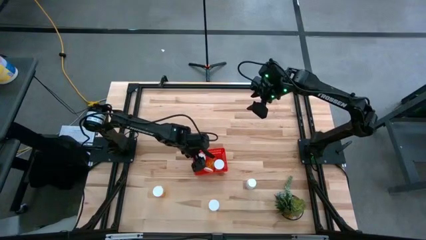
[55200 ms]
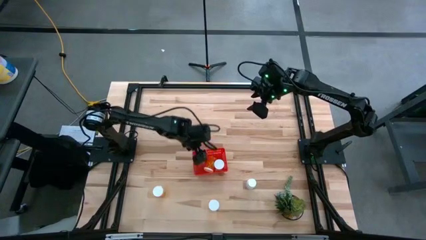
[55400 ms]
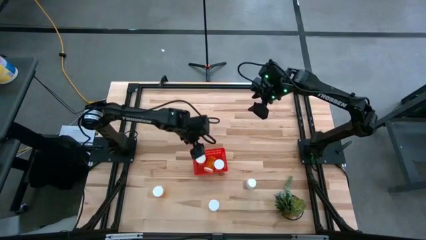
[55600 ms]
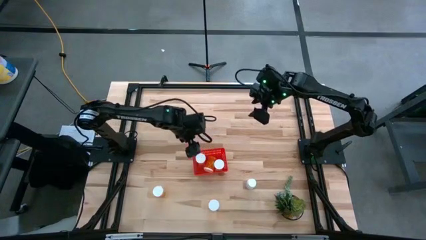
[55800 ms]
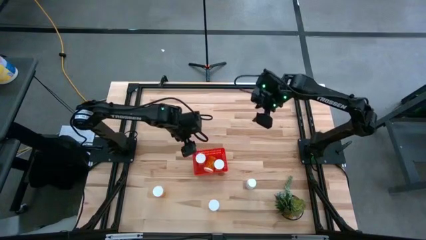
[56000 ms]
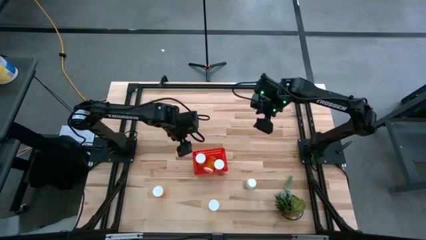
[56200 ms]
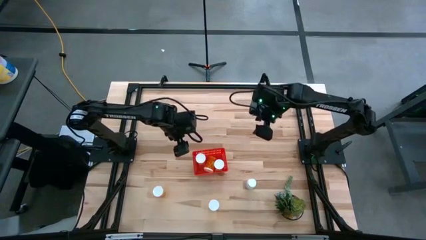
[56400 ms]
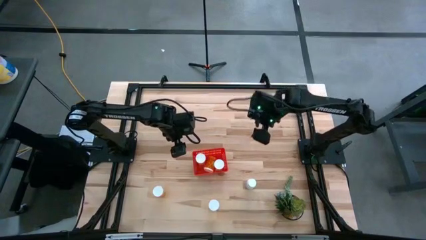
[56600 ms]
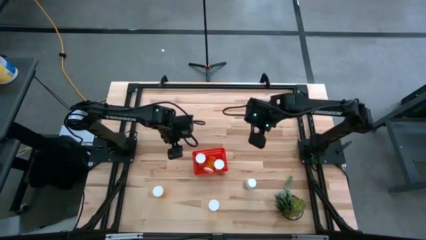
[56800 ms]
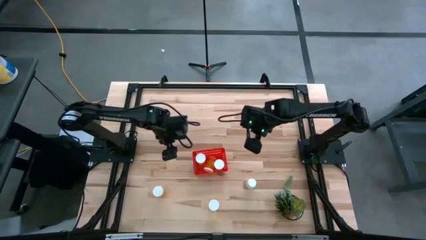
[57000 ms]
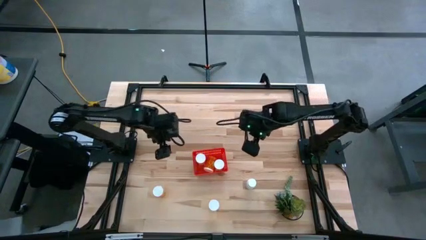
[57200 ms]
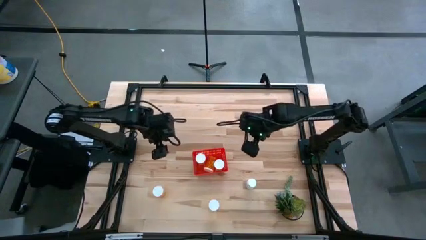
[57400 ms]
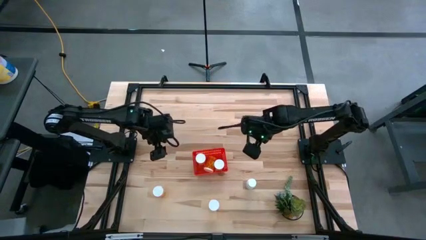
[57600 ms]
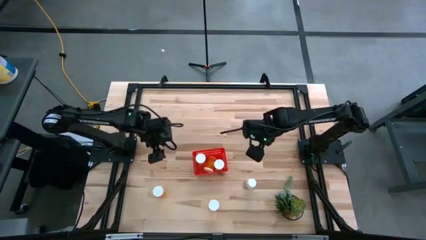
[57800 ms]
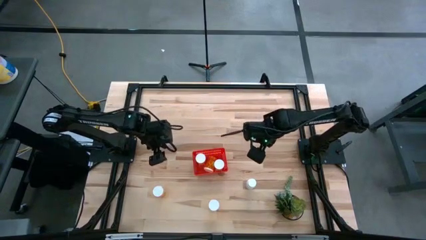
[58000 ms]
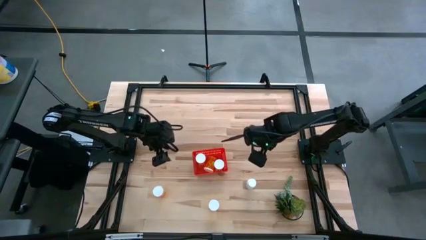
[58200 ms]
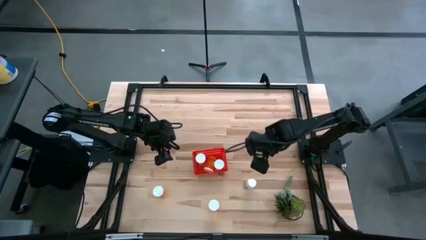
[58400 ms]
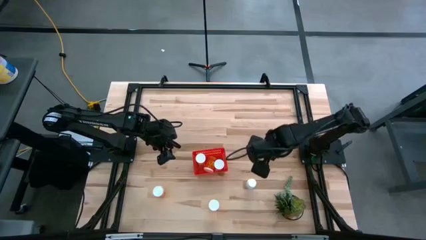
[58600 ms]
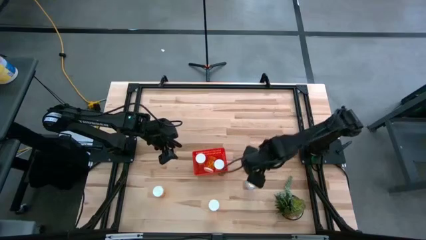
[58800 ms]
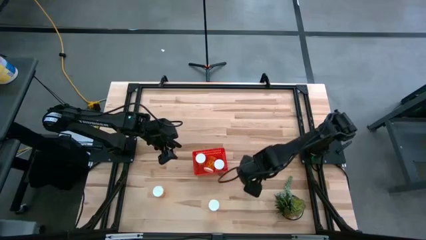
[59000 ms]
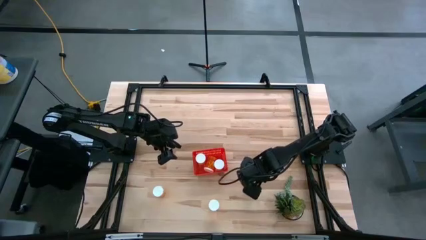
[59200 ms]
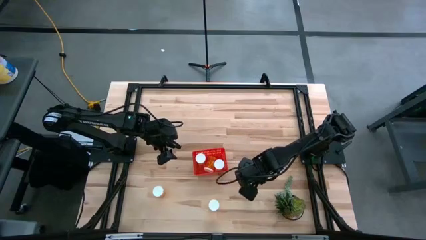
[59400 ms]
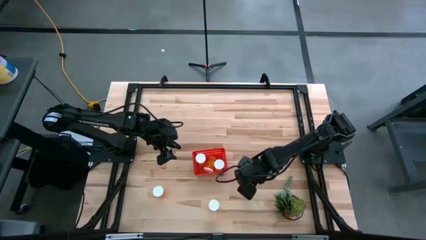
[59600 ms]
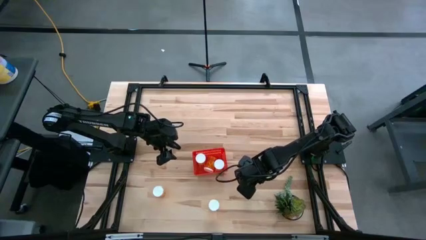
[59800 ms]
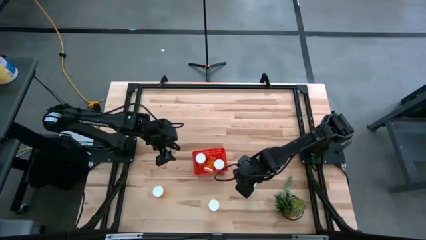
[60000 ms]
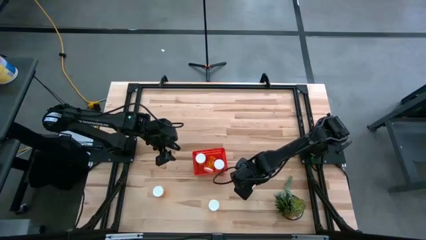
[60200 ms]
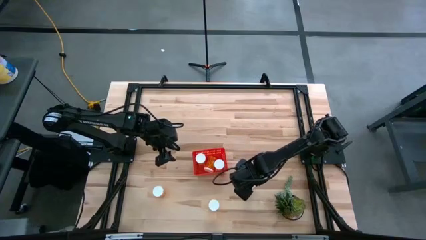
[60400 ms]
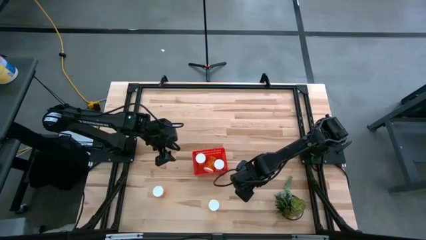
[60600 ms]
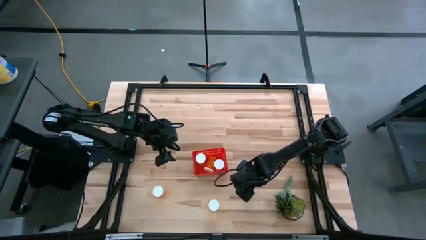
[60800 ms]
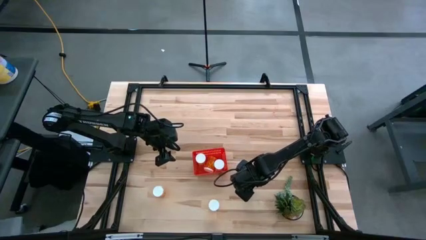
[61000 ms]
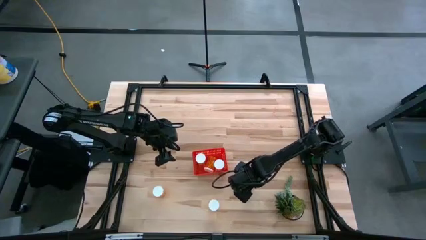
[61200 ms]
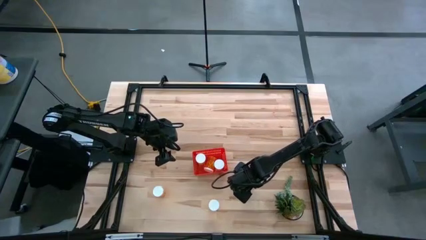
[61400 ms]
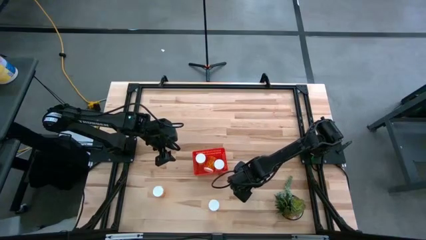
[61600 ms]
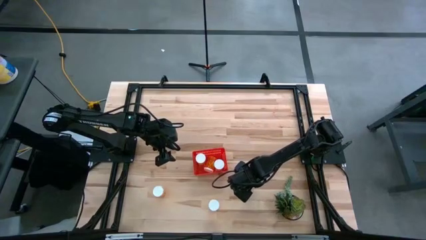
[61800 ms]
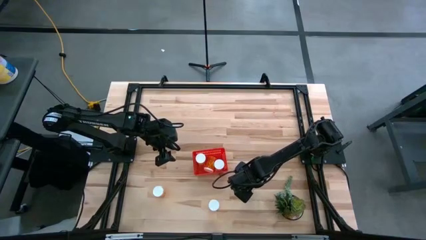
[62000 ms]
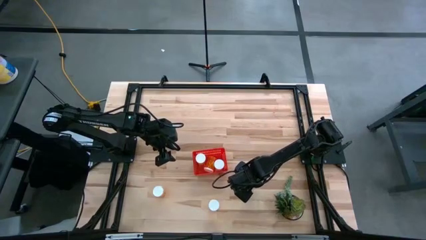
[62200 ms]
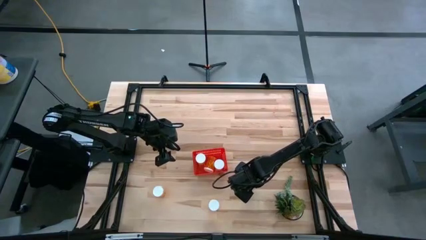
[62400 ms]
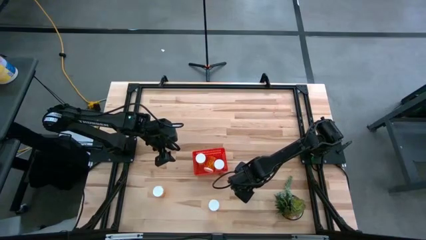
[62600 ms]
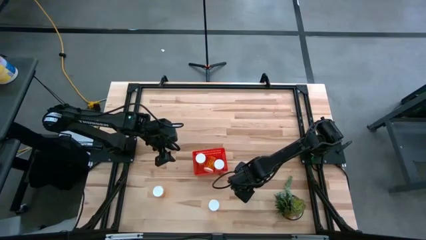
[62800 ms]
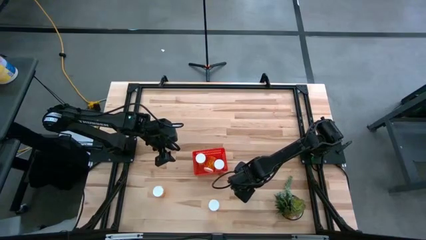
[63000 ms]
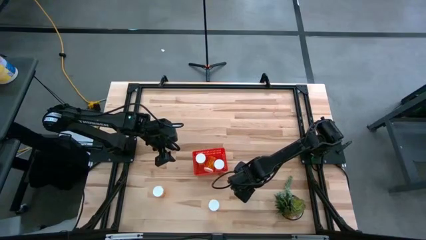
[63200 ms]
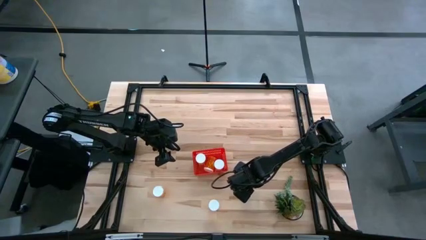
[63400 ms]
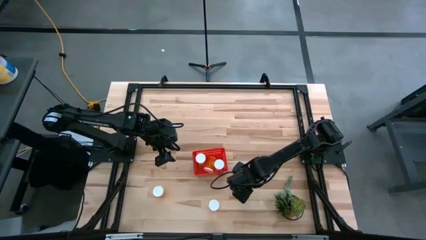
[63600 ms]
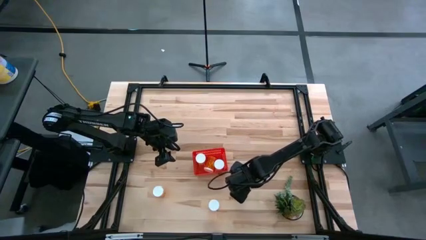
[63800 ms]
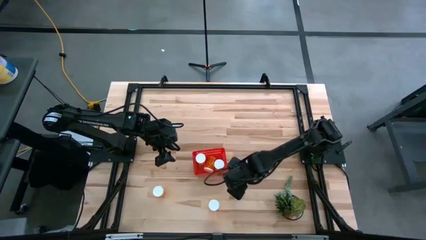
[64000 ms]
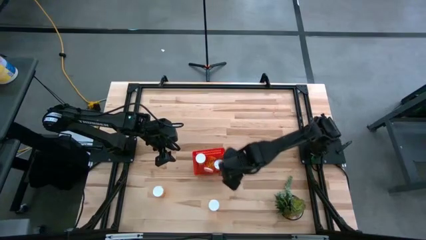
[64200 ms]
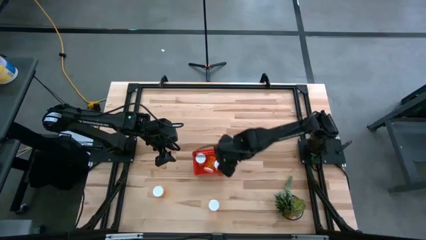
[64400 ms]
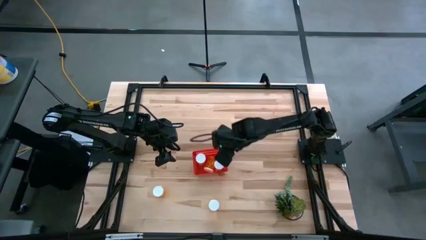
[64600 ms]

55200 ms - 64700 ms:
Task: Pick and place pill bottles into a basket
Put the white pill bottle into the red basket

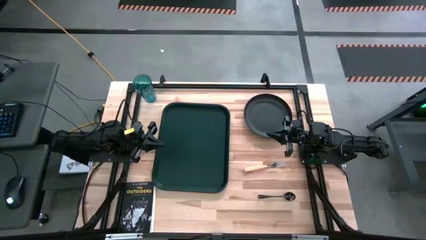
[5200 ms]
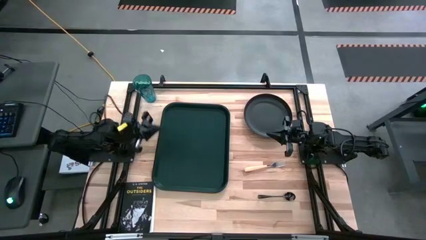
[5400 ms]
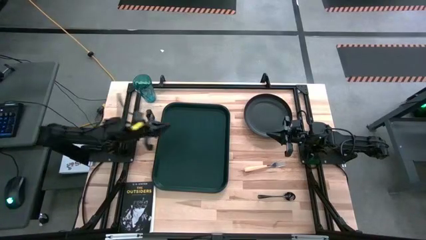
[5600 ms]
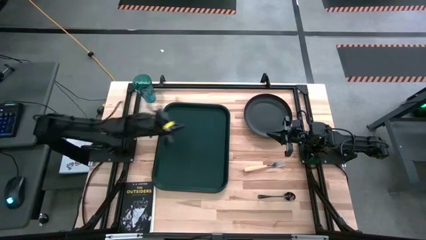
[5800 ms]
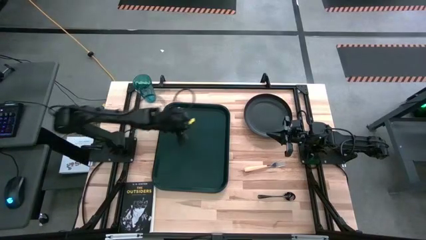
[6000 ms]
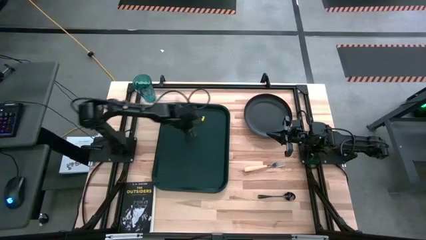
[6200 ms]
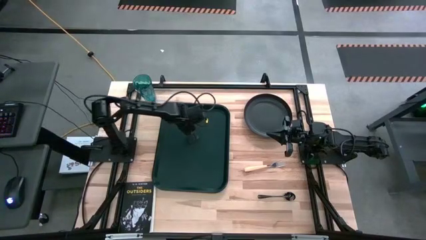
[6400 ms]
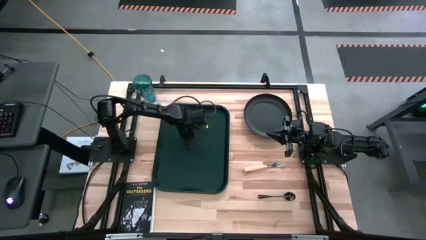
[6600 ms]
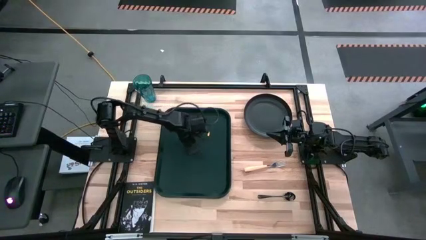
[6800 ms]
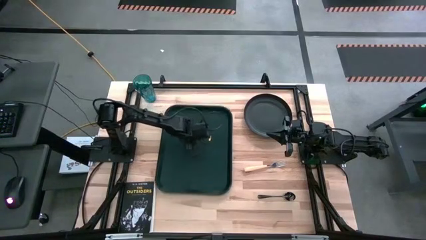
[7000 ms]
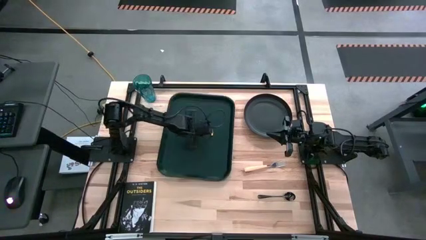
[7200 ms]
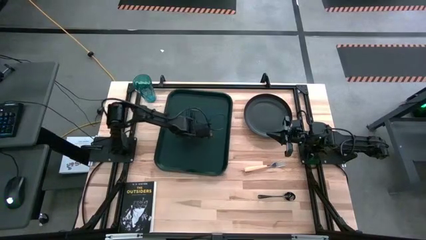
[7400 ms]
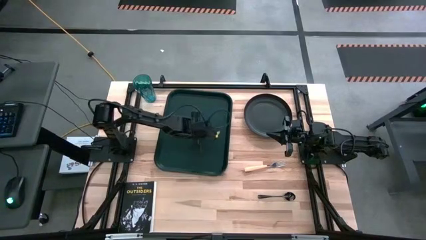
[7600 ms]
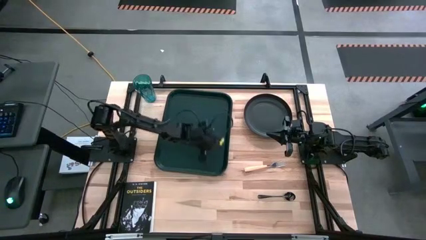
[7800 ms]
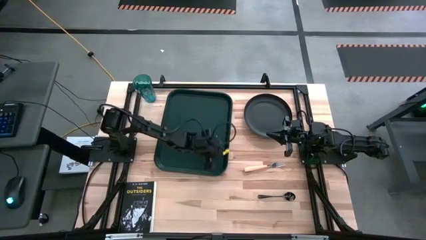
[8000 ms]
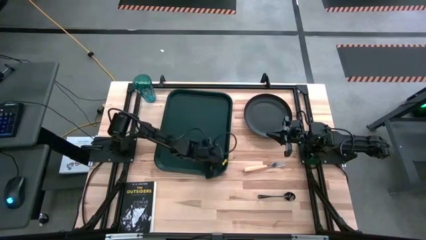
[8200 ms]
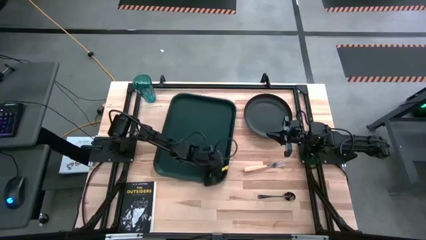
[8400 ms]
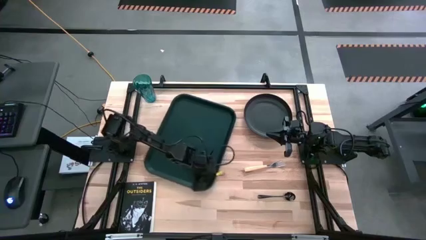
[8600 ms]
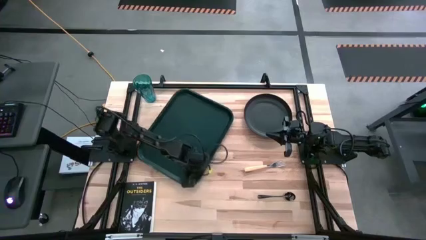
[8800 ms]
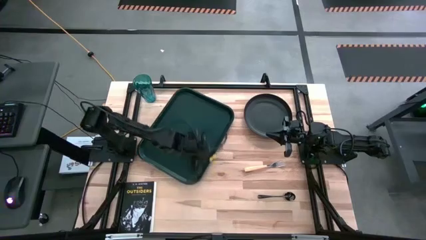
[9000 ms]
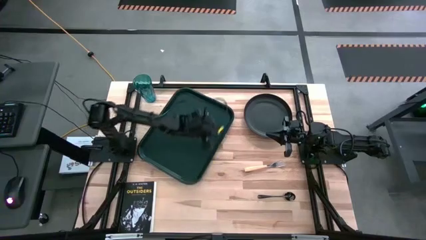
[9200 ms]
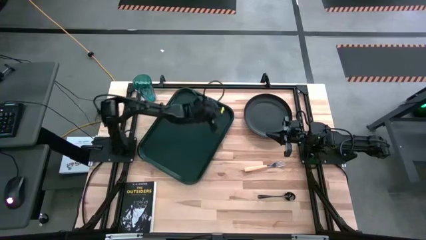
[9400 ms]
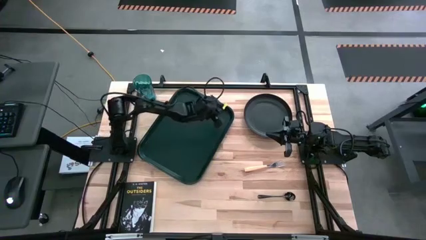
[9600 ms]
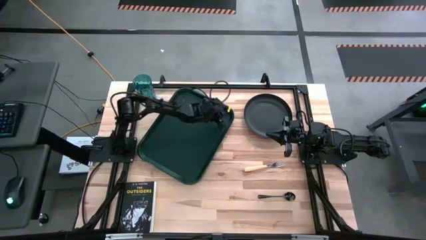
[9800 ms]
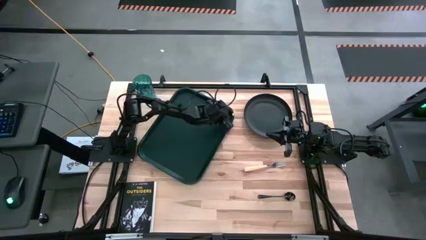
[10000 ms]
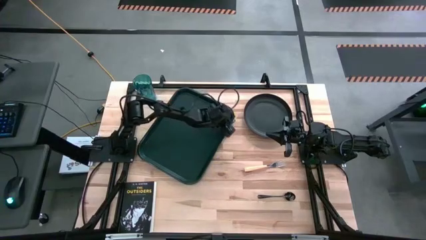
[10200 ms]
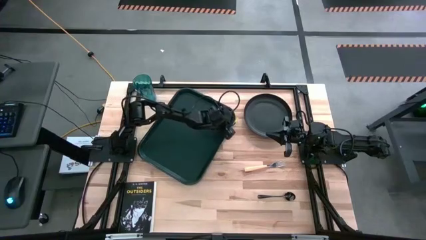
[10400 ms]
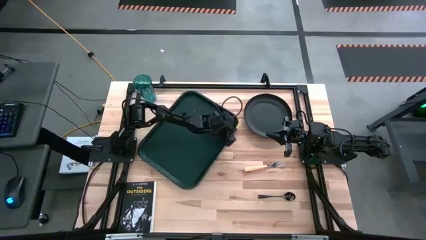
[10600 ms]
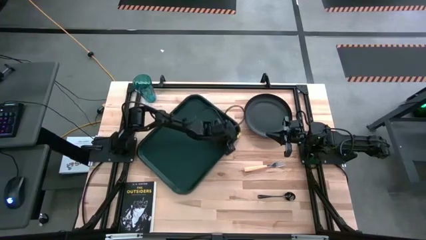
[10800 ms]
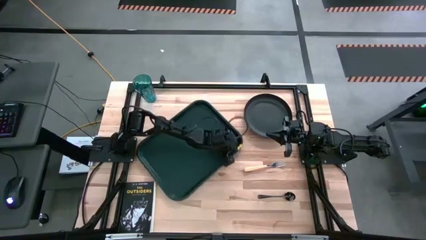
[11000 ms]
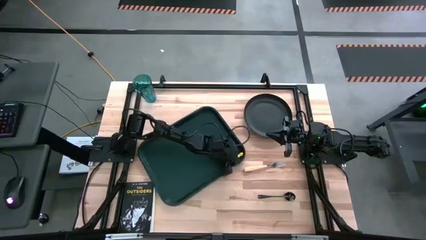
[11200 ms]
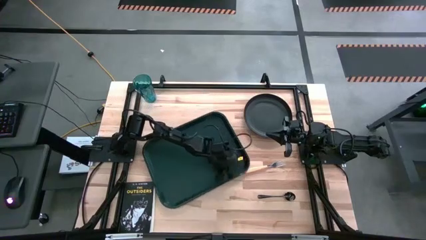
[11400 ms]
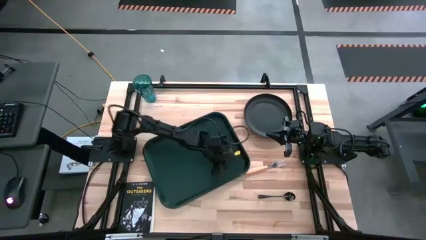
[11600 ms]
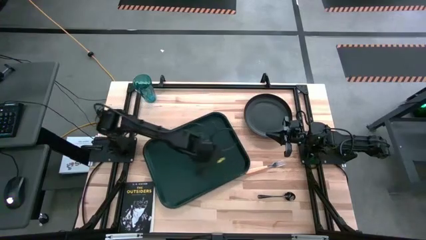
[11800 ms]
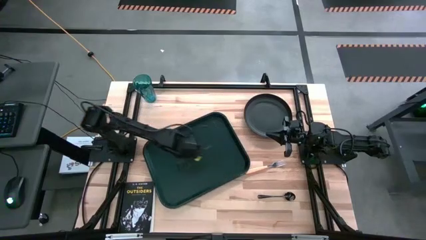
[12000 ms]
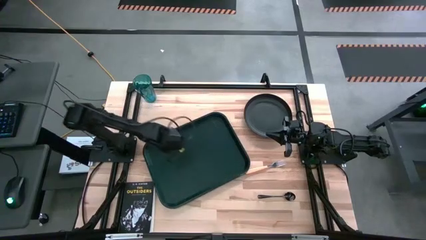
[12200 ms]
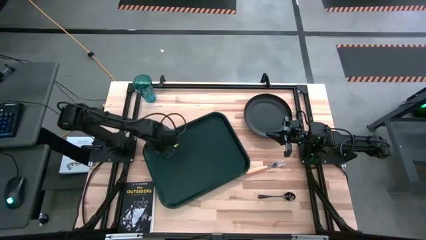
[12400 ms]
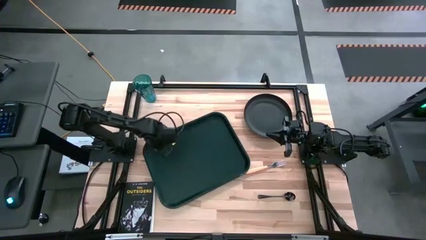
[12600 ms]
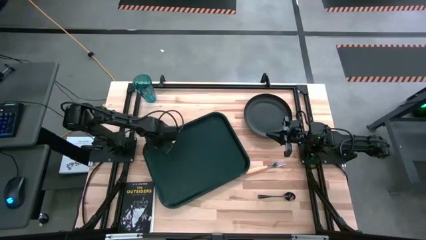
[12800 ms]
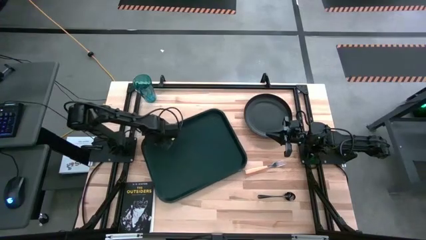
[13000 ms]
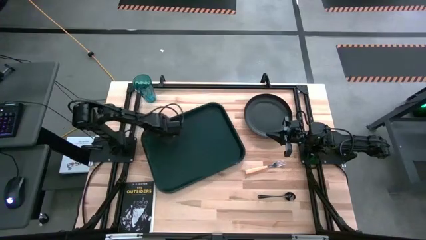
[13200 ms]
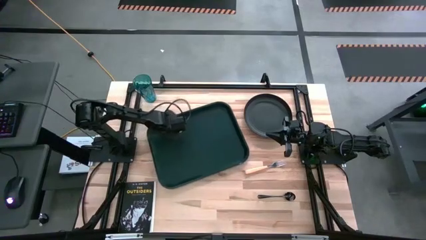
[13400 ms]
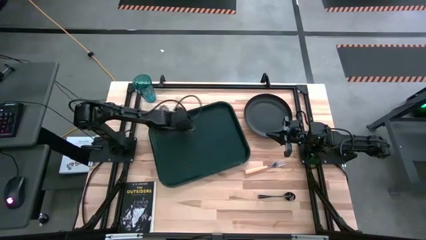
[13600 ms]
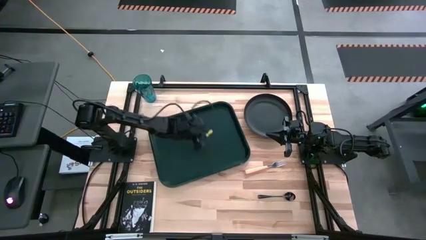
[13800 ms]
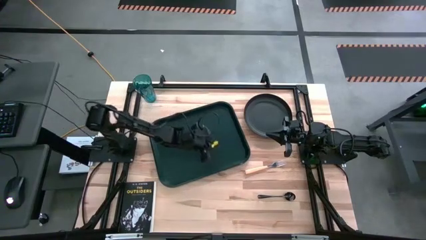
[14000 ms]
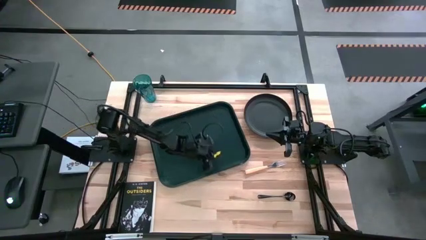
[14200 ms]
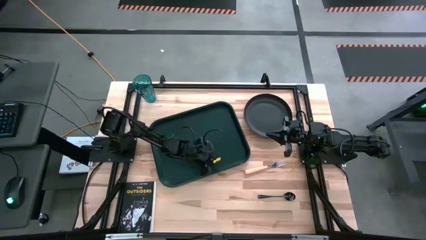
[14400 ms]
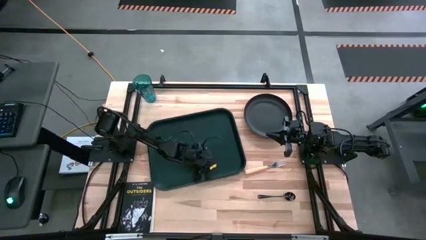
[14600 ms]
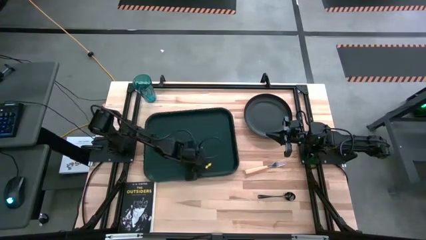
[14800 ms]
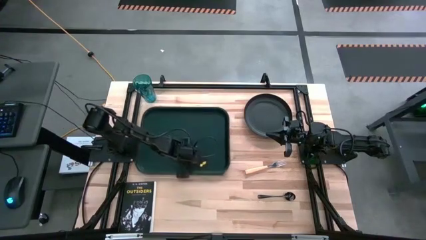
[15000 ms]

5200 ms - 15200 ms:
Task: Pick and place plate/cup/fork/spoon on tray
Move the black tray to the middle left of the table
